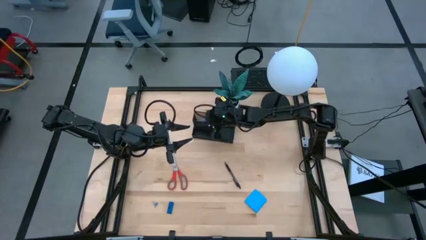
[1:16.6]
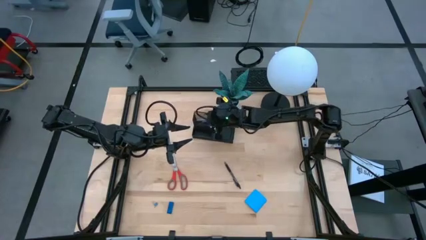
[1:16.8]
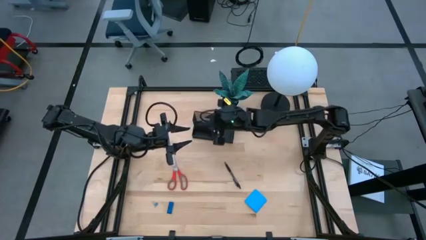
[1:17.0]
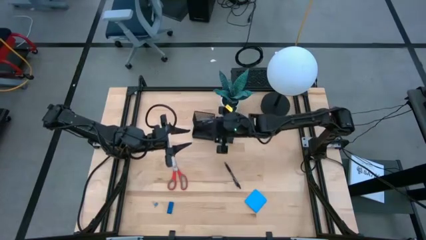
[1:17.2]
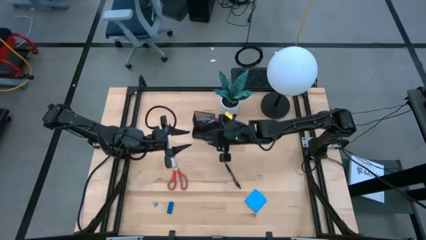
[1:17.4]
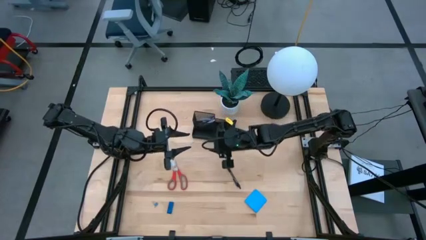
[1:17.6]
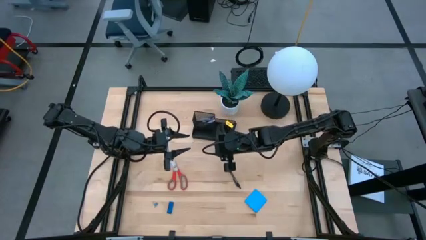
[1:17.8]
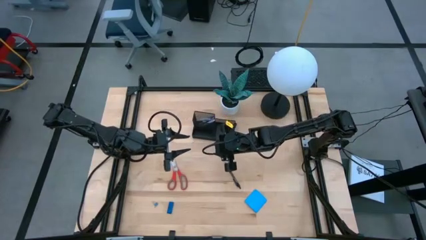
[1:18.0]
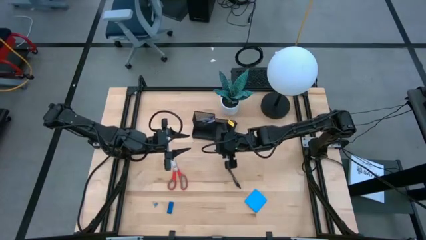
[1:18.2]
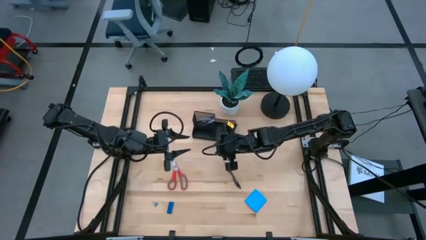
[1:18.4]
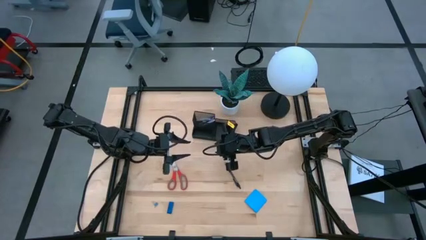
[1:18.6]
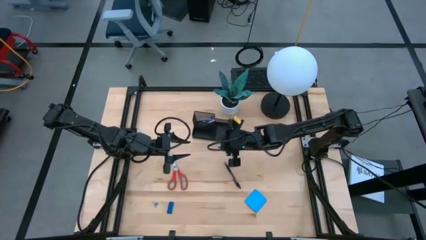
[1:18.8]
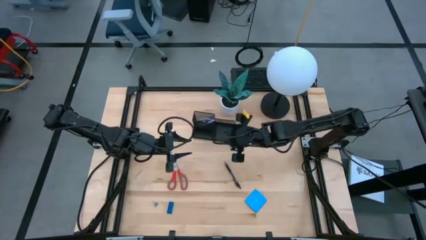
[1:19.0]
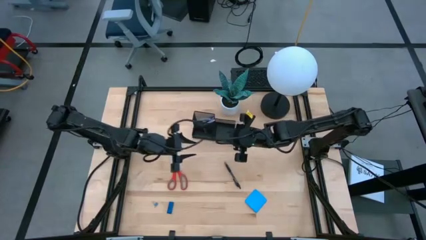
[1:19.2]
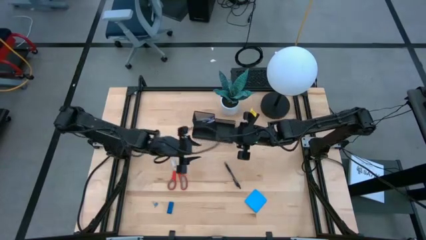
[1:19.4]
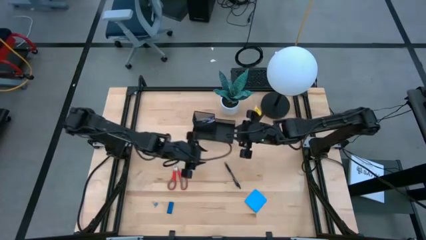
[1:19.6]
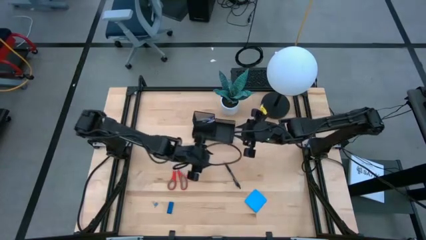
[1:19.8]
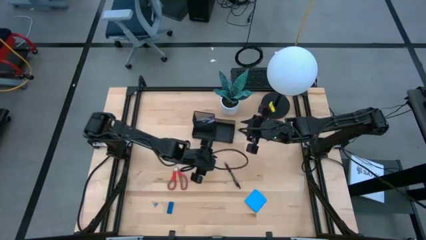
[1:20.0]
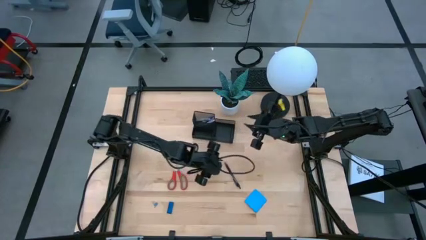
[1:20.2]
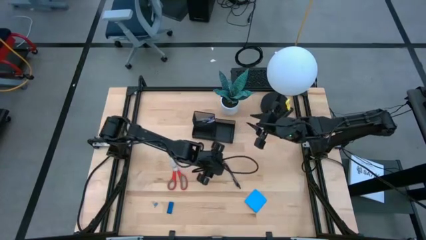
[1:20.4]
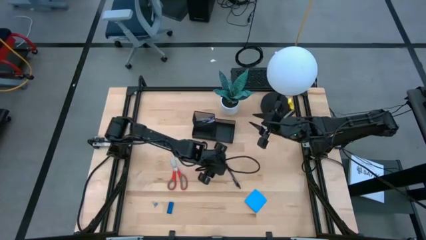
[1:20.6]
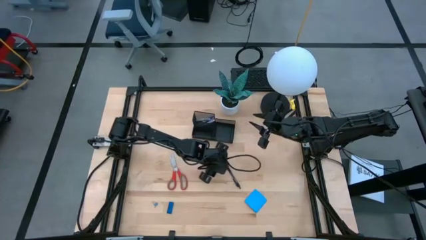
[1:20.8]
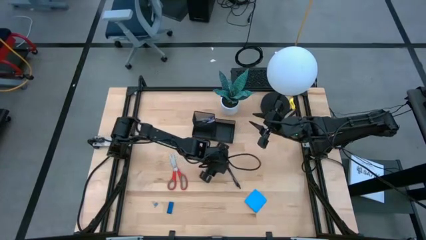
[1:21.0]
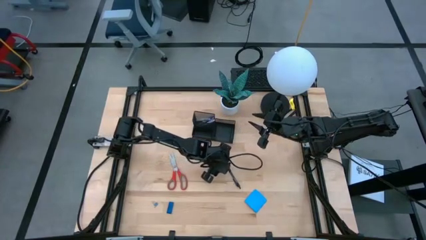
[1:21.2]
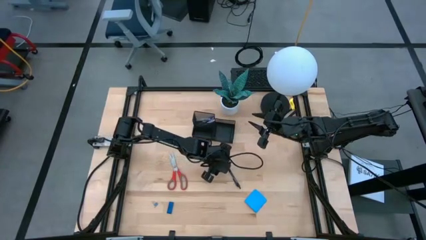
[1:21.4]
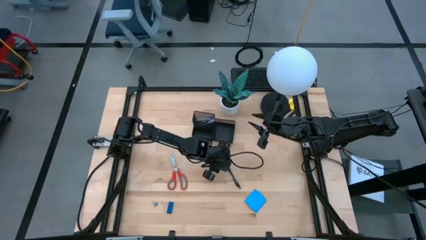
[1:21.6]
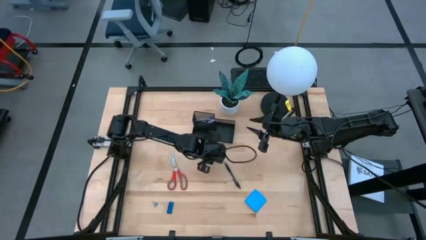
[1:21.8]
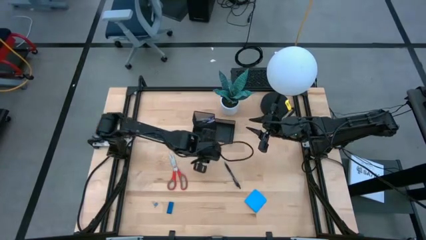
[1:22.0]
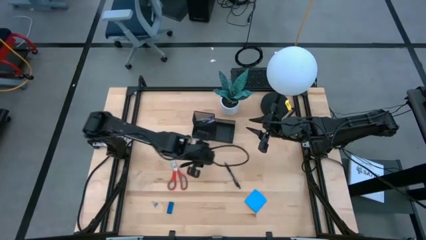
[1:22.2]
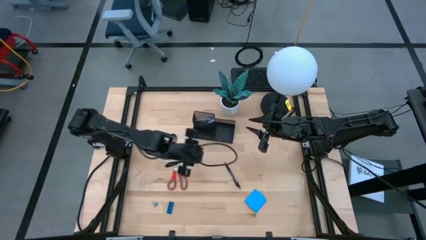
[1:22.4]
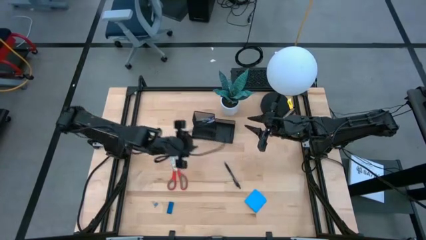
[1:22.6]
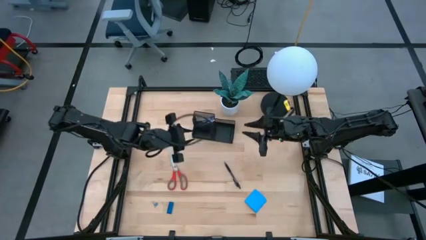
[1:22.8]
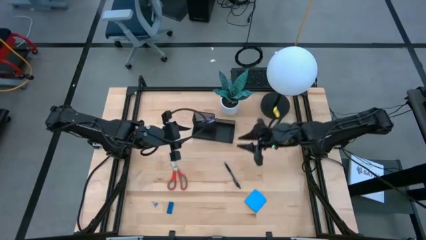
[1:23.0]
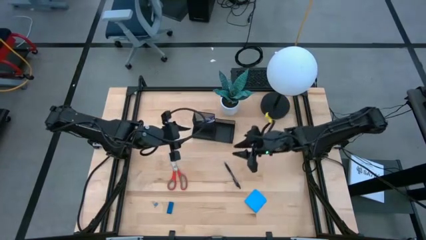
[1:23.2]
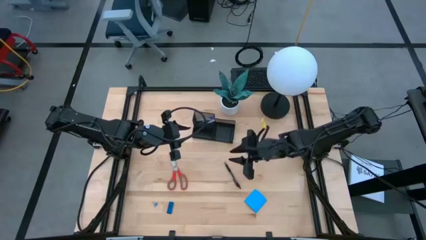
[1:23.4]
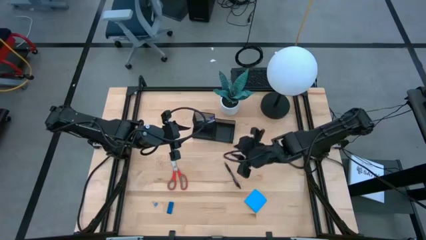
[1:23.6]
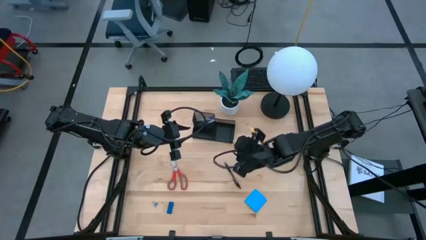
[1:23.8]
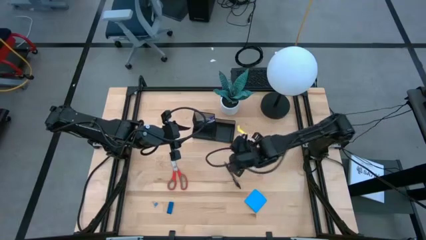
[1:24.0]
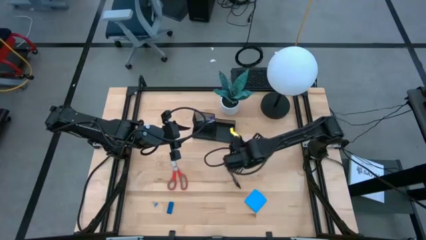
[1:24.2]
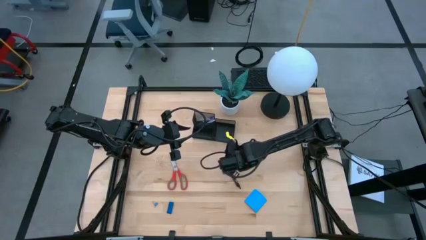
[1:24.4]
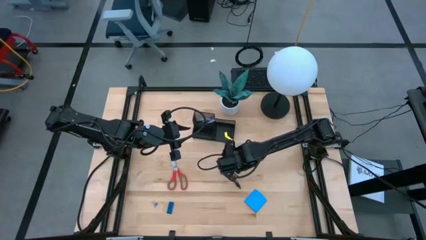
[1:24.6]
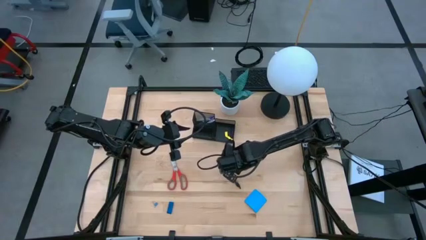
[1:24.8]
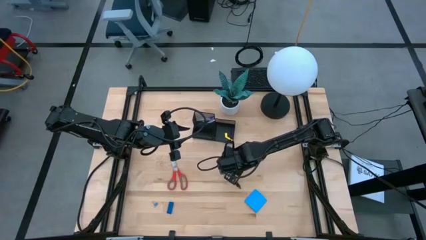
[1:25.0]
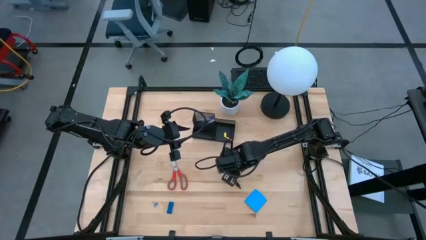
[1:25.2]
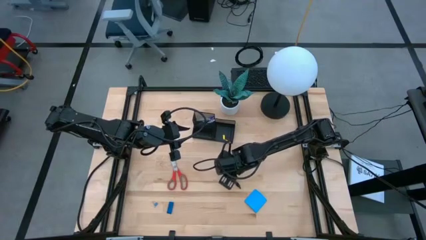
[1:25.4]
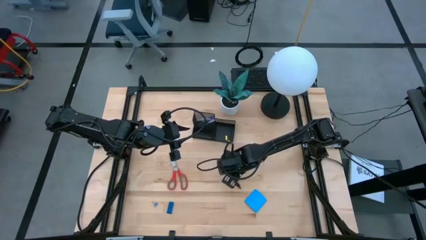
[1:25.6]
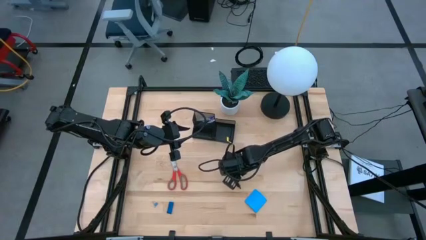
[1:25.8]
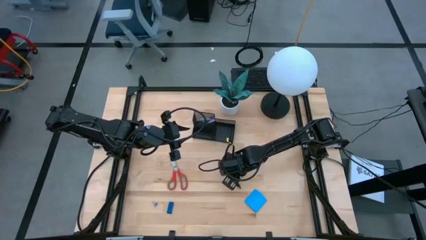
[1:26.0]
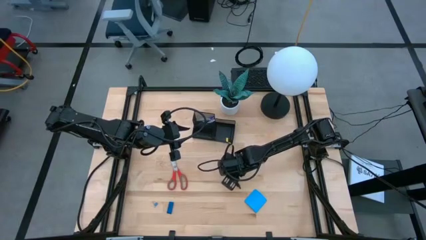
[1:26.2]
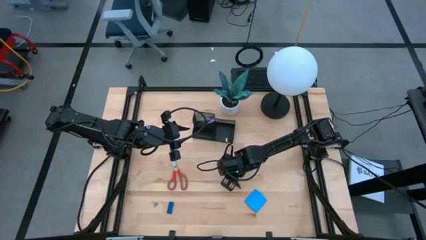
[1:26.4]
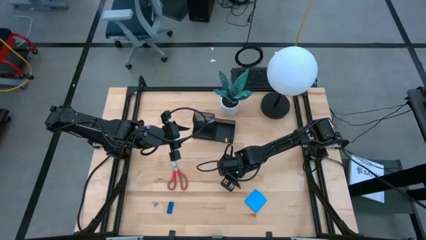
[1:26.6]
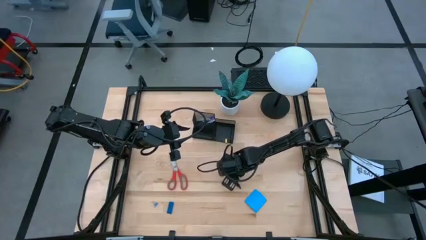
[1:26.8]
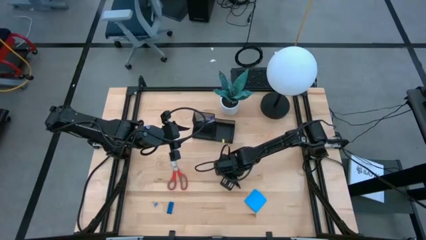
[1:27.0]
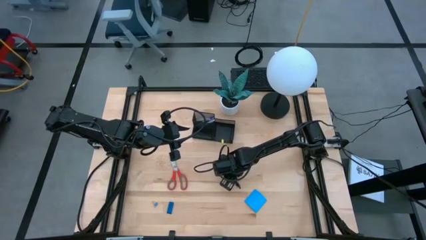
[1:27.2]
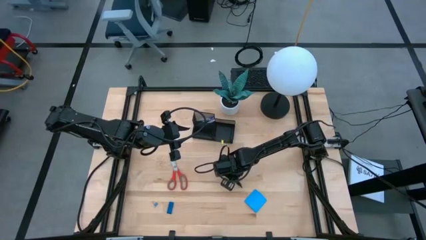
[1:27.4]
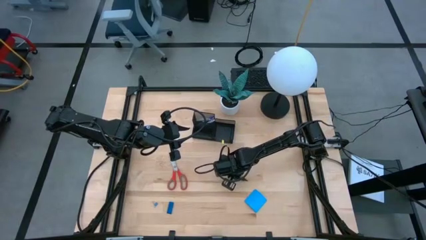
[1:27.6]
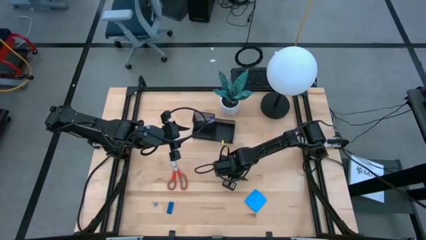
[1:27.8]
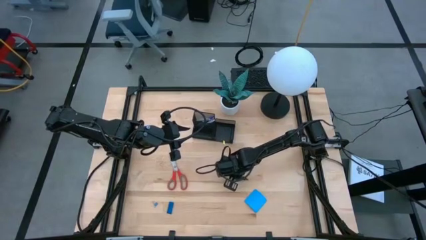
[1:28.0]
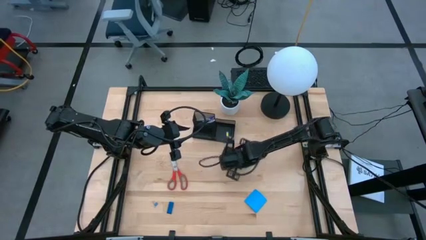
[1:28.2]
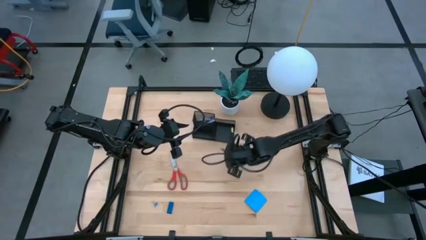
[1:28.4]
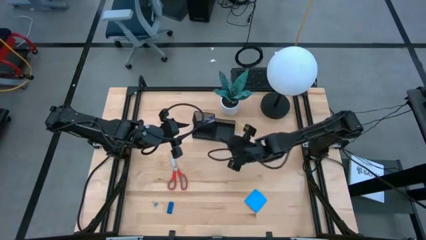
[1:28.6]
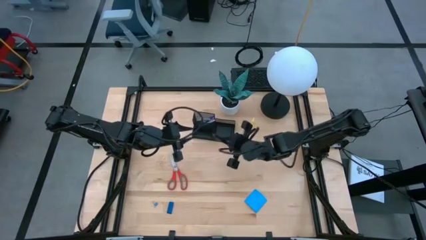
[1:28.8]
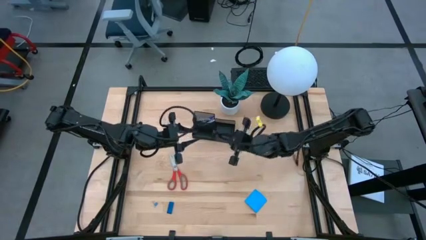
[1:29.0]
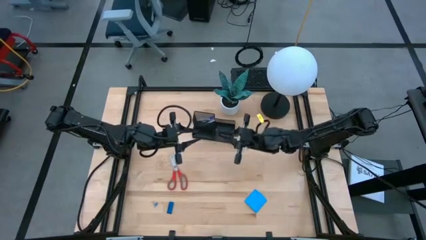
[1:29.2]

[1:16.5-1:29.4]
Task: Pick and place office supplies into organizer
Put the black pen into the black desk organizer
